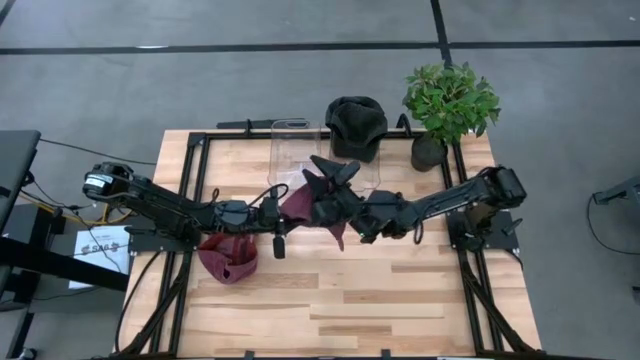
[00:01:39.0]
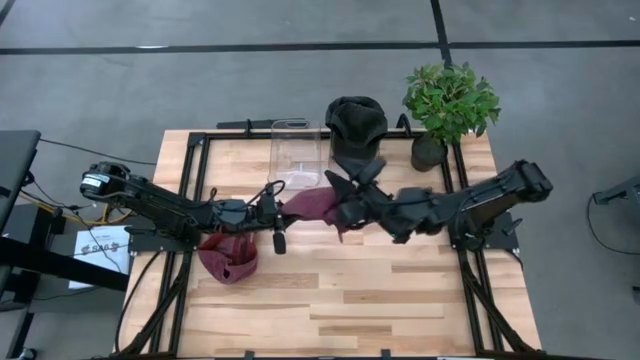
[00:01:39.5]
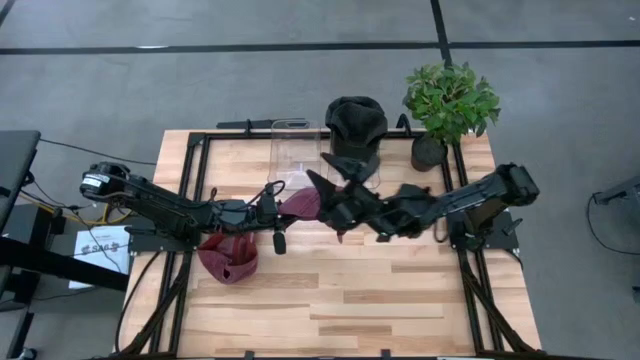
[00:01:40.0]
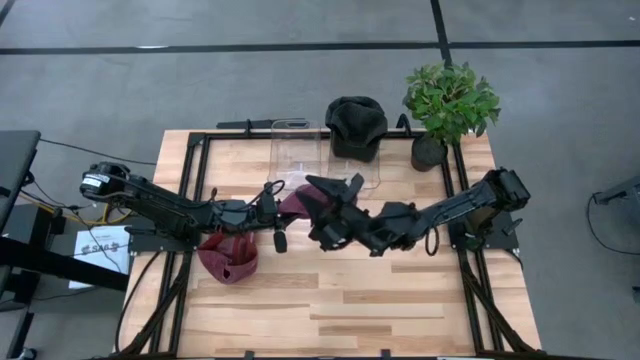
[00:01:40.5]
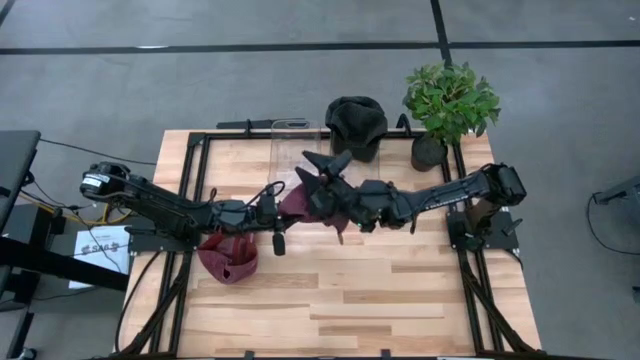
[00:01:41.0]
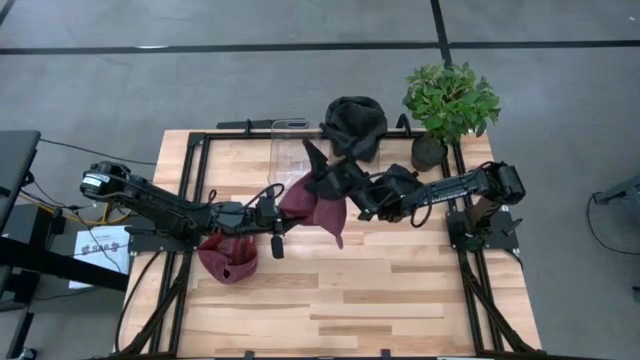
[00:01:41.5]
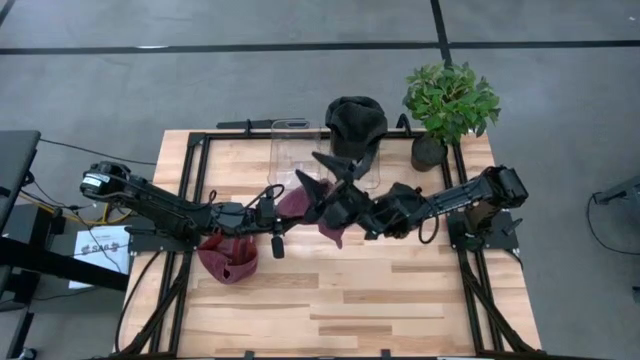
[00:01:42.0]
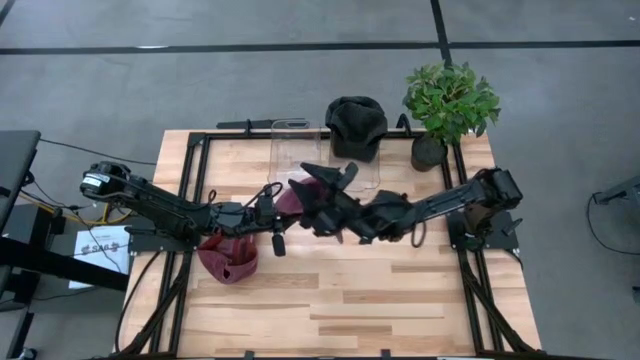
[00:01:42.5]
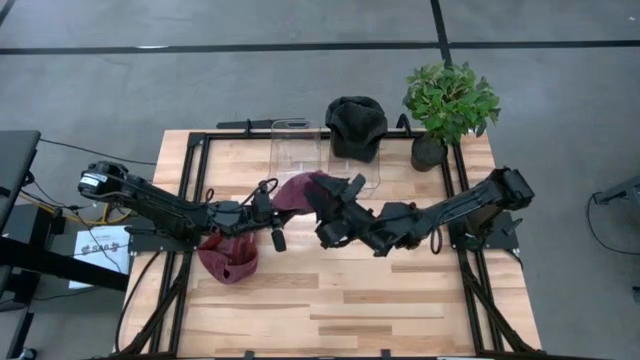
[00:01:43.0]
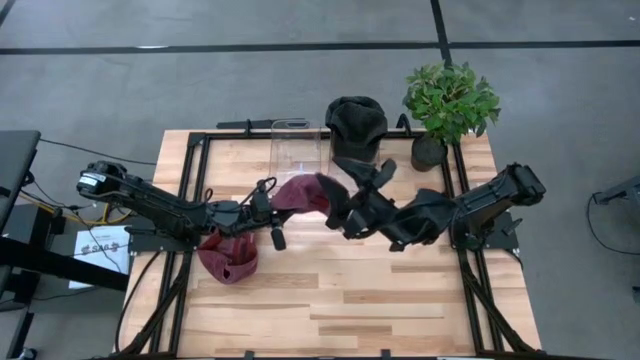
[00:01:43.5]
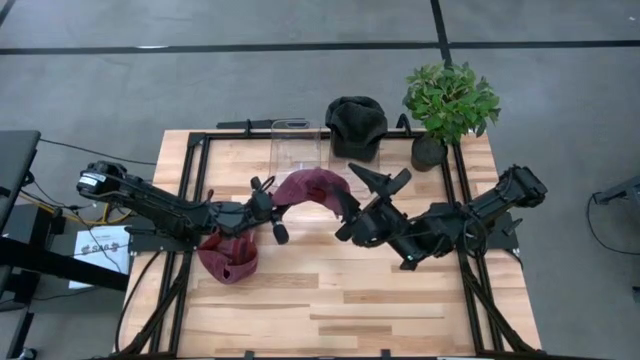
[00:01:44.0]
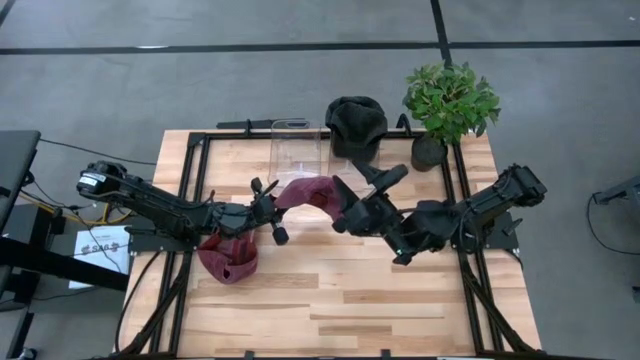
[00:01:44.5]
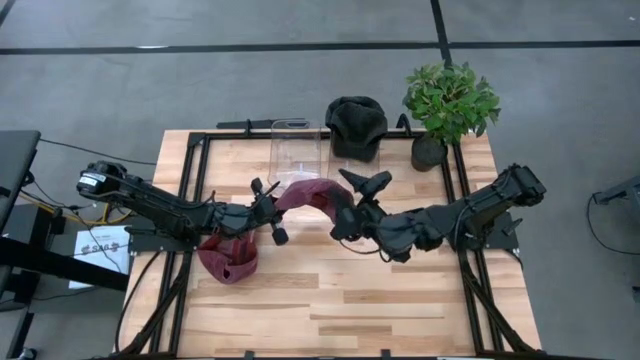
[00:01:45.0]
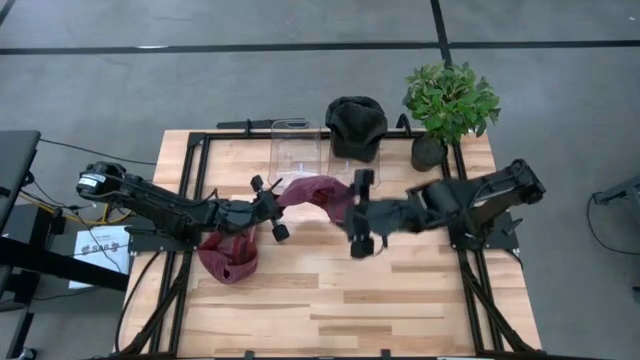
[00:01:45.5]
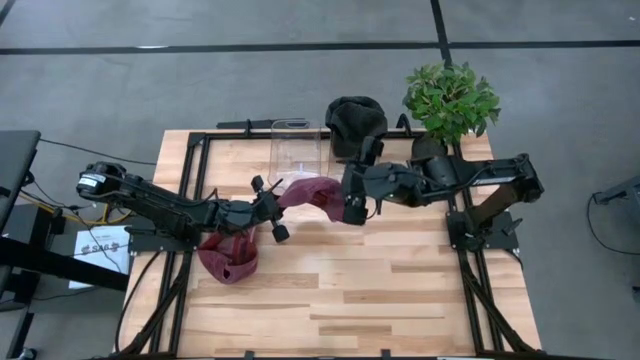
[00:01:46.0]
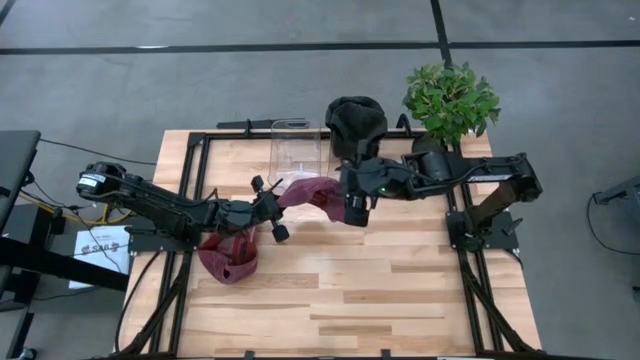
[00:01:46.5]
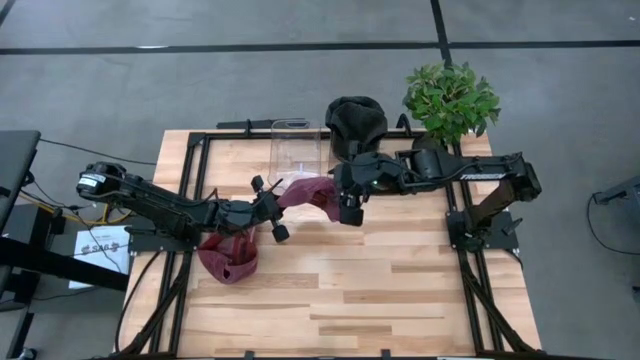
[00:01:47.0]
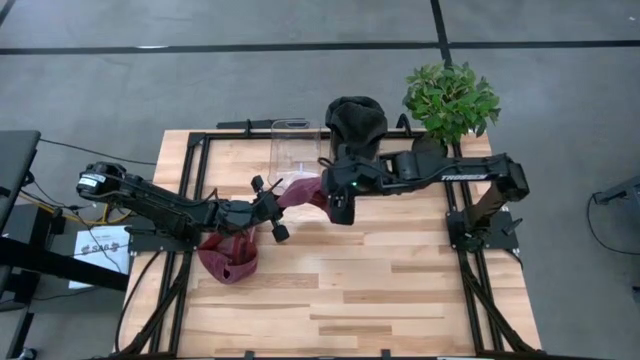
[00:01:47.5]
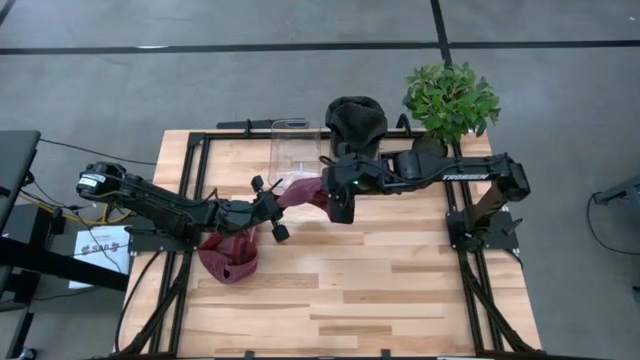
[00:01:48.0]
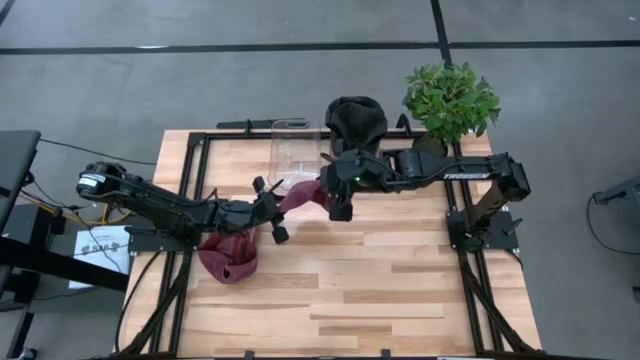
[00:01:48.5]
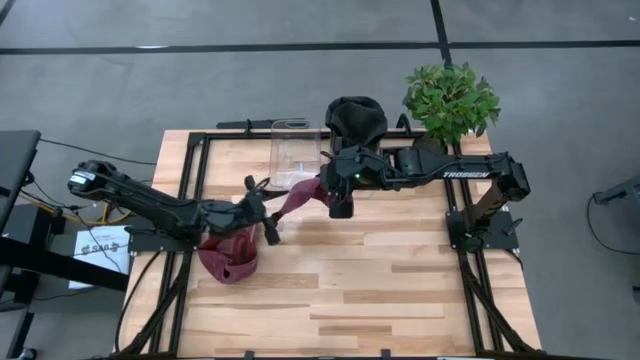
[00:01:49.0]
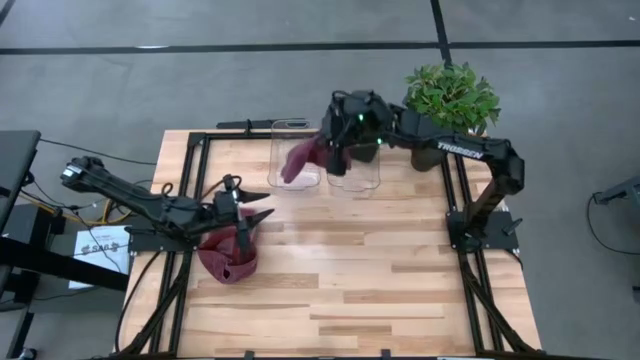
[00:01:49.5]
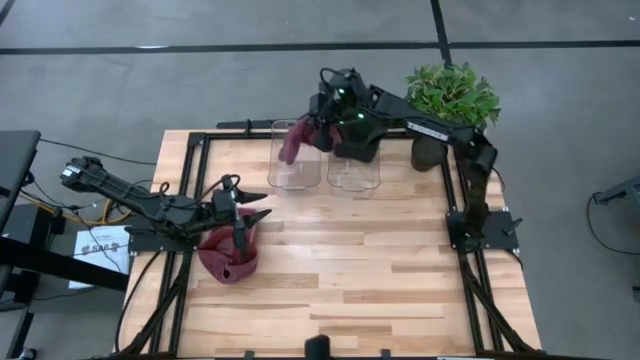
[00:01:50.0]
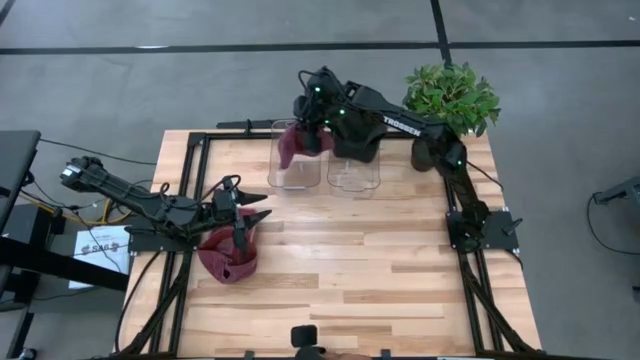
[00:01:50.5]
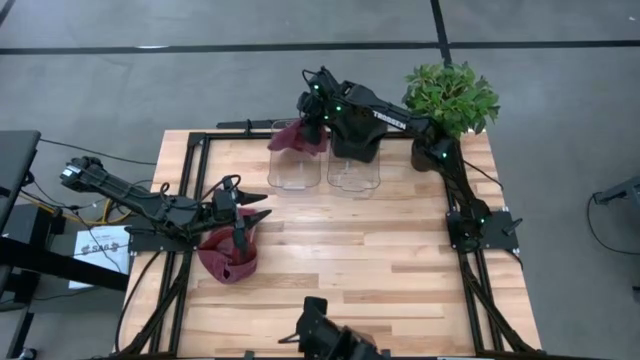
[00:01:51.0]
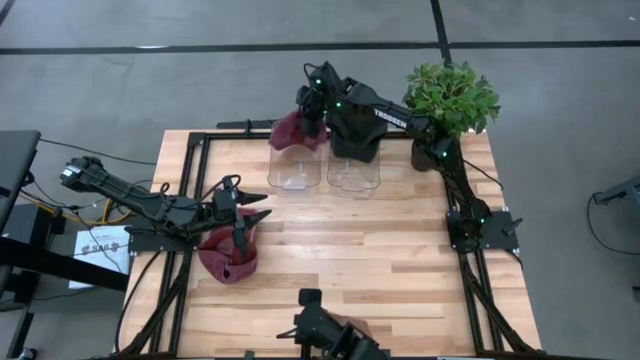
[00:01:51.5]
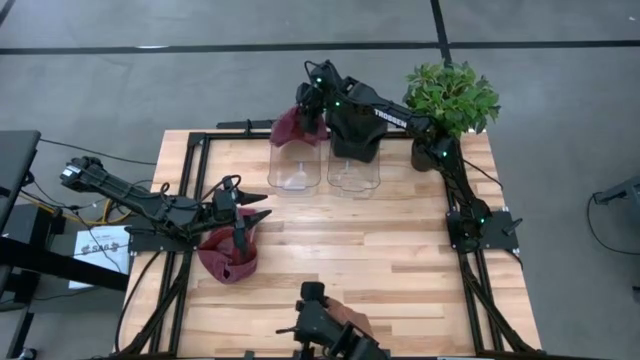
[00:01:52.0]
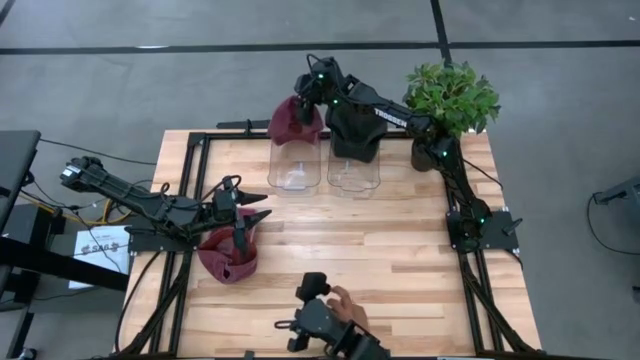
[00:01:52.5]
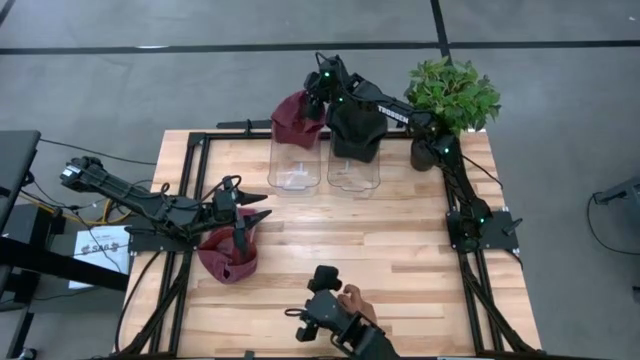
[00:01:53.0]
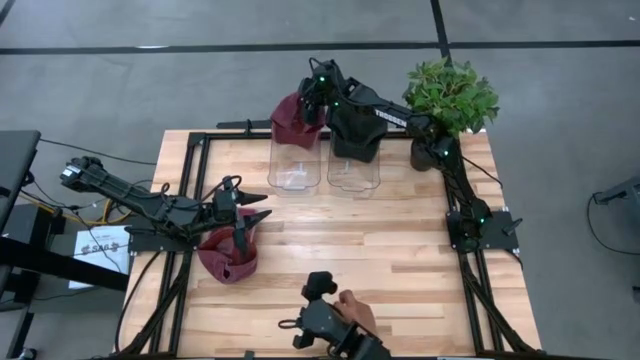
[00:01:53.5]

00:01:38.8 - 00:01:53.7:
Task: Pick & Place hat
Put the right red cap into the left transparent bin

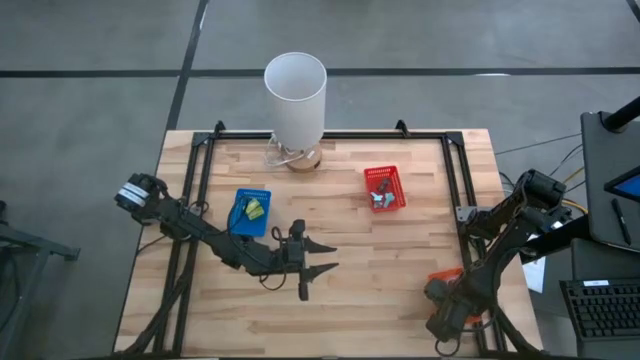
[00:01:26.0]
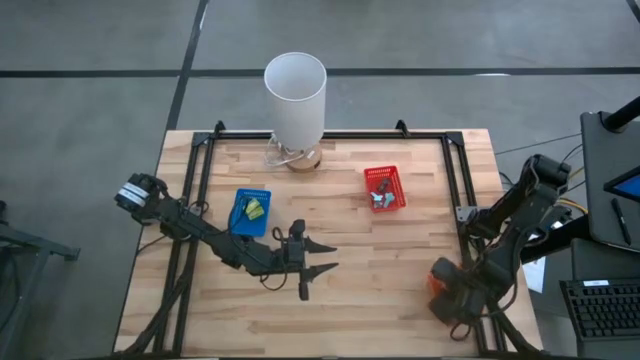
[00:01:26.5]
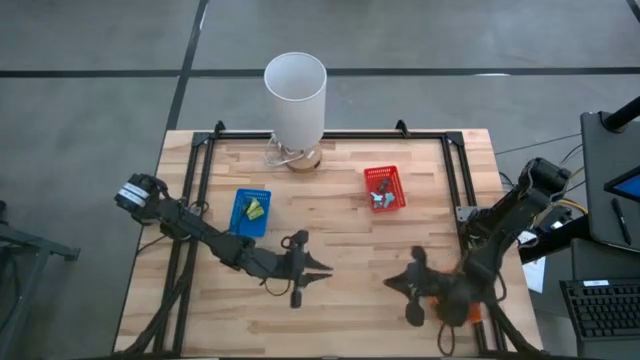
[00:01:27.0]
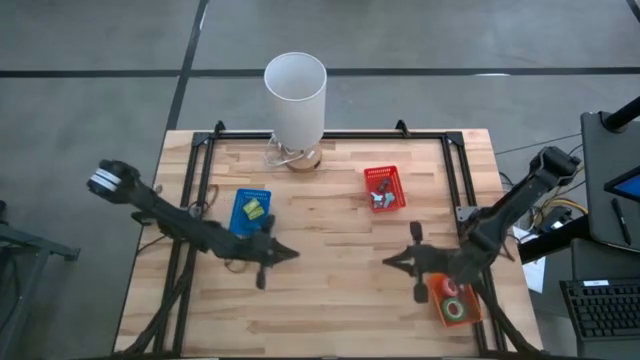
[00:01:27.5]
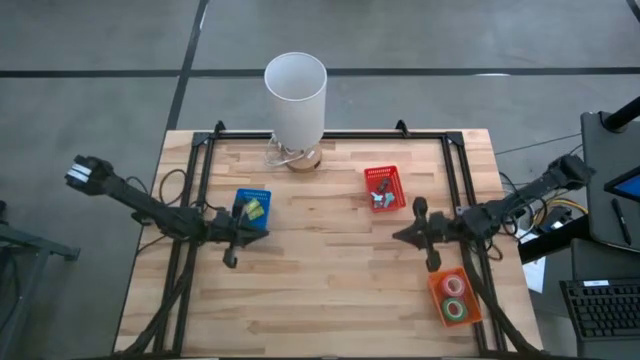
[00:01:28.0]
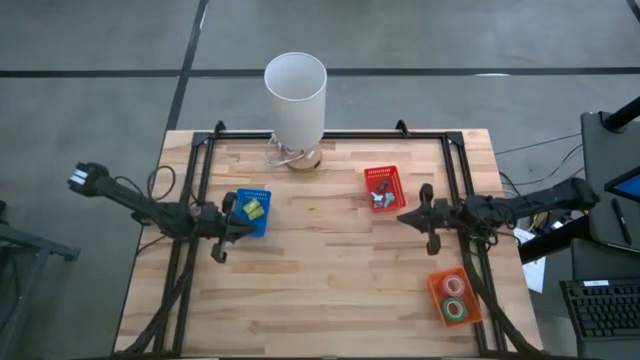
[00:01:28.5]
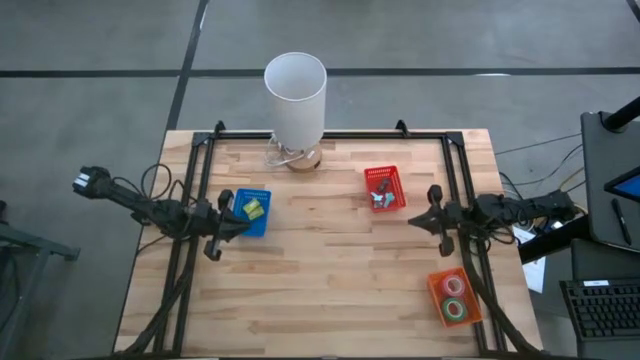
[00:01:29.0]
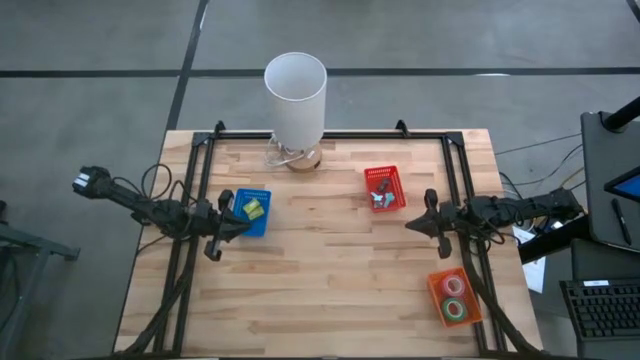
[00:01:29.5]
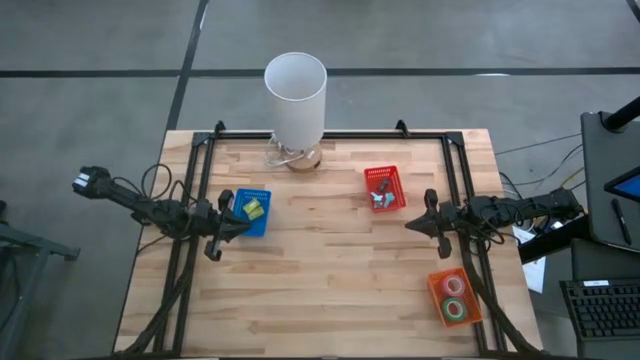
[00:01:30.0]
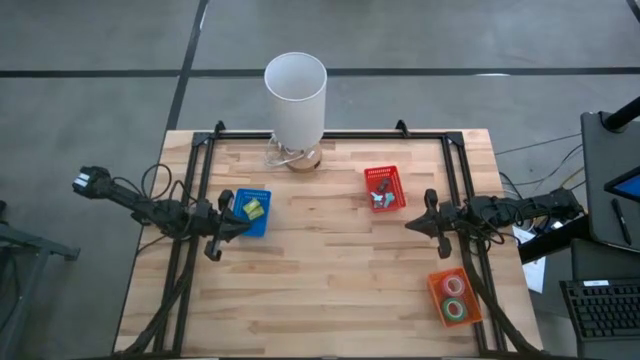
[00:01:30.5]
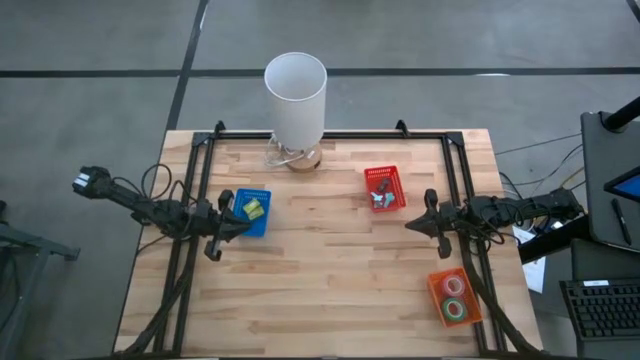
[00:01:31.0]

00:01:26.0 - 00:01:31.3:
Task: Pick and place Stapler, Stapler remover, tape
Return to Home Position
